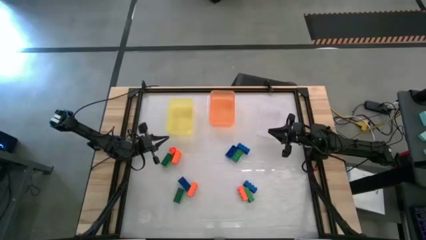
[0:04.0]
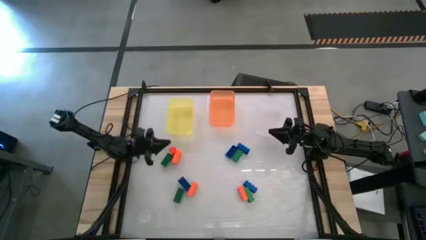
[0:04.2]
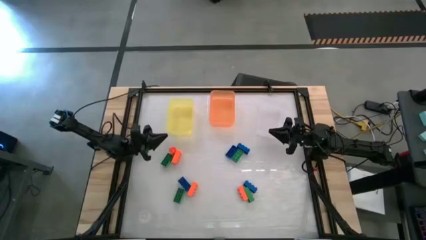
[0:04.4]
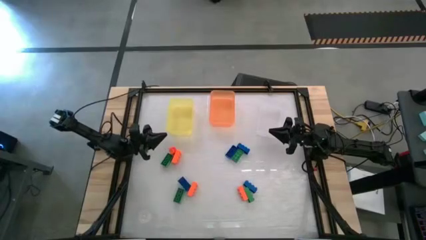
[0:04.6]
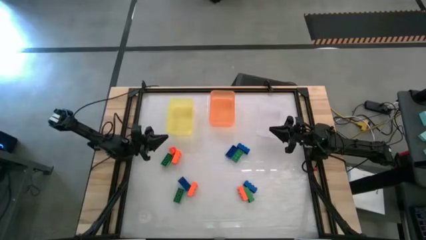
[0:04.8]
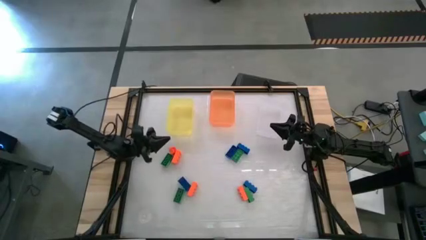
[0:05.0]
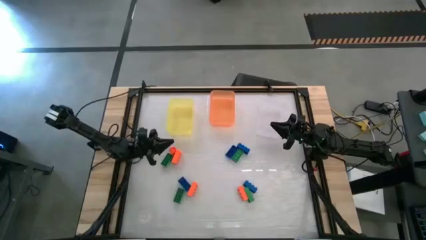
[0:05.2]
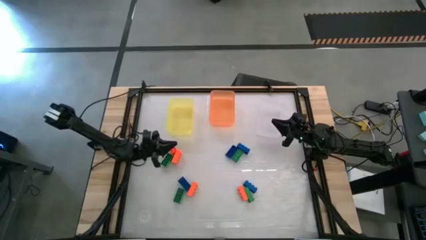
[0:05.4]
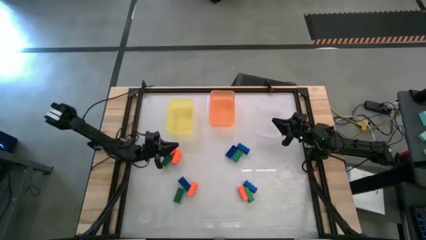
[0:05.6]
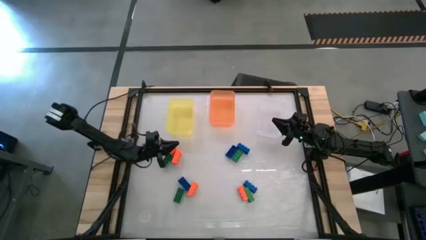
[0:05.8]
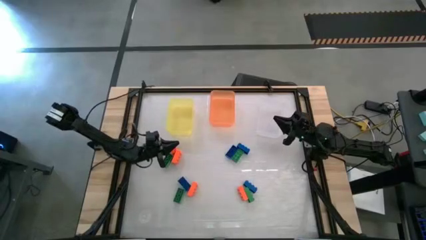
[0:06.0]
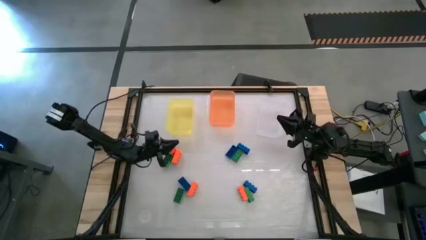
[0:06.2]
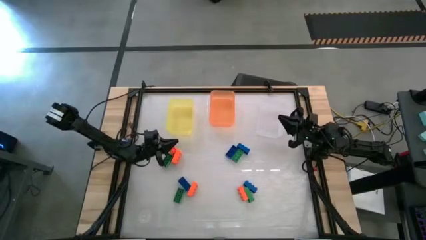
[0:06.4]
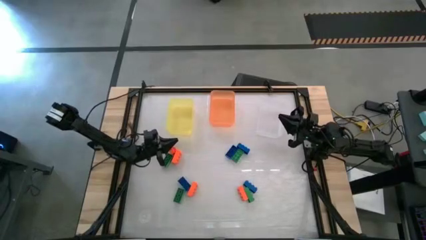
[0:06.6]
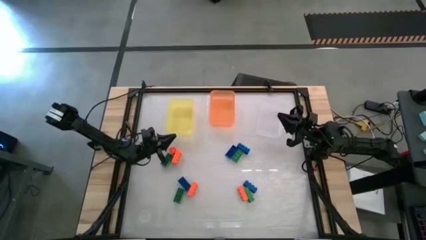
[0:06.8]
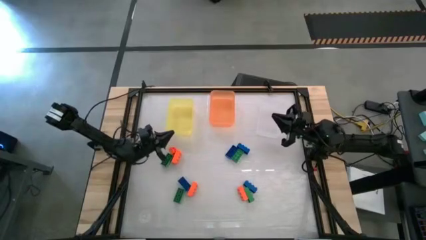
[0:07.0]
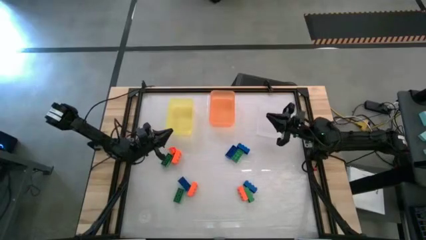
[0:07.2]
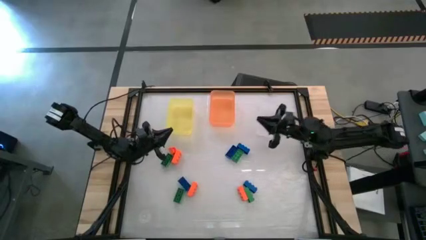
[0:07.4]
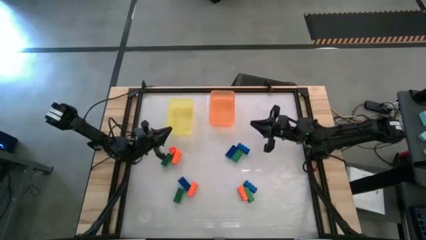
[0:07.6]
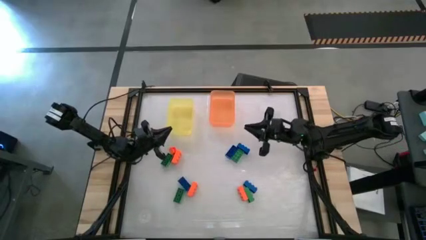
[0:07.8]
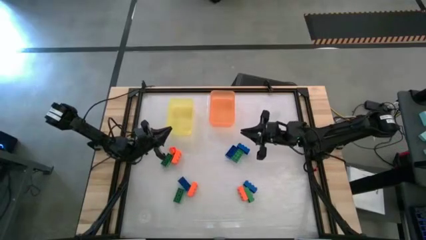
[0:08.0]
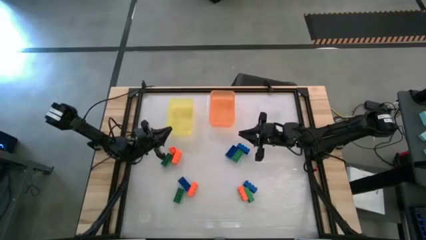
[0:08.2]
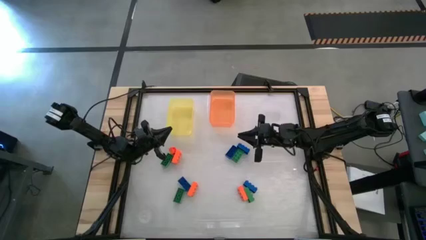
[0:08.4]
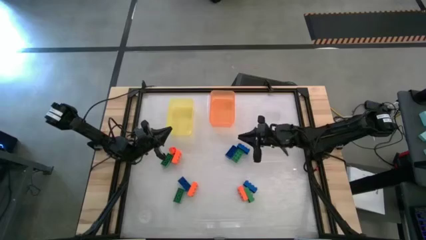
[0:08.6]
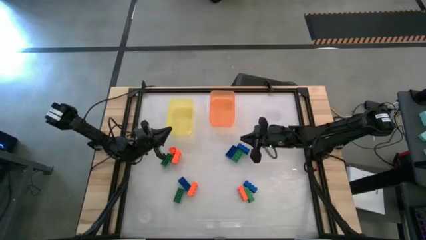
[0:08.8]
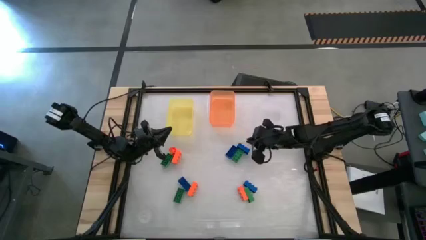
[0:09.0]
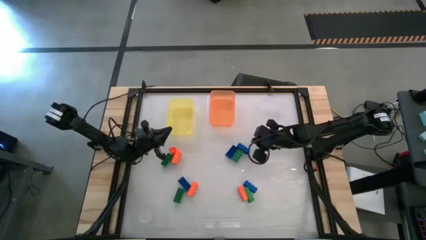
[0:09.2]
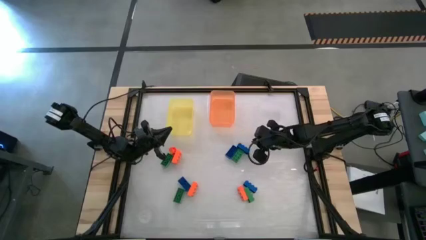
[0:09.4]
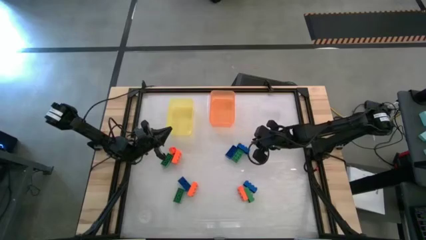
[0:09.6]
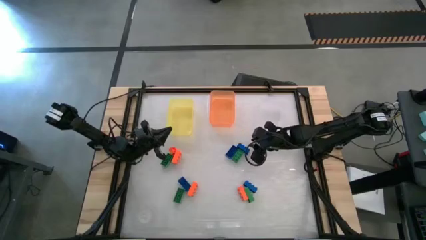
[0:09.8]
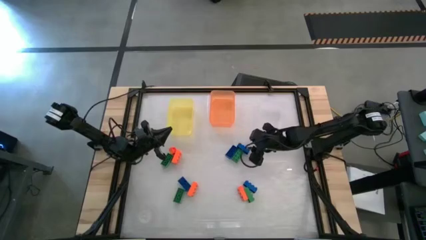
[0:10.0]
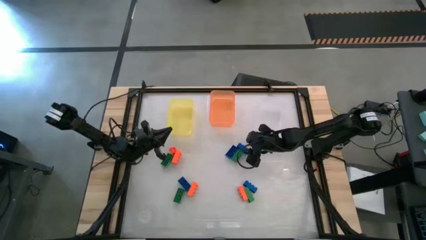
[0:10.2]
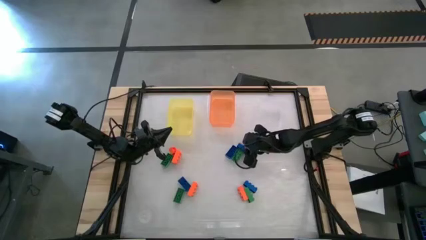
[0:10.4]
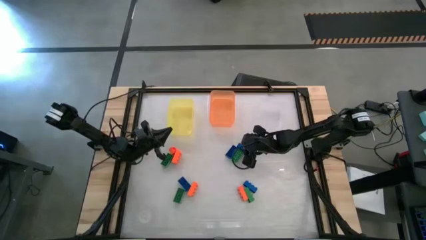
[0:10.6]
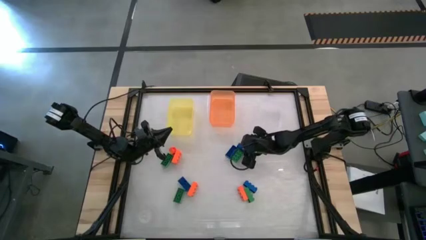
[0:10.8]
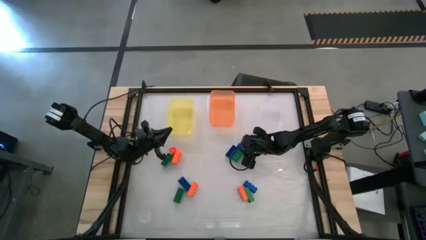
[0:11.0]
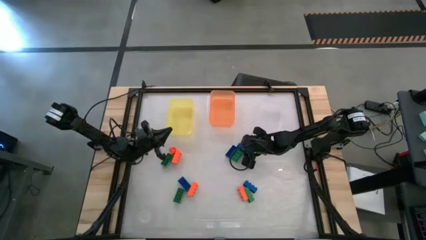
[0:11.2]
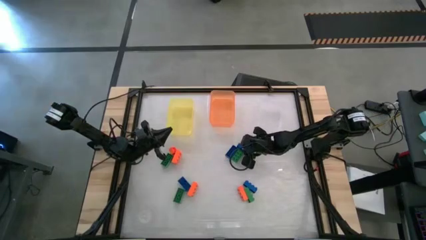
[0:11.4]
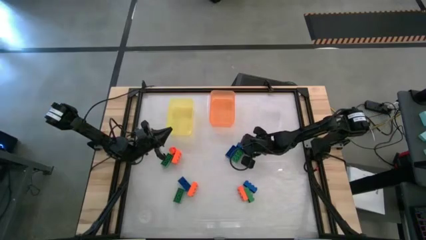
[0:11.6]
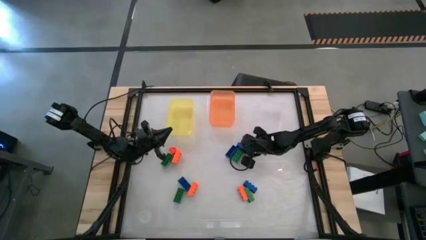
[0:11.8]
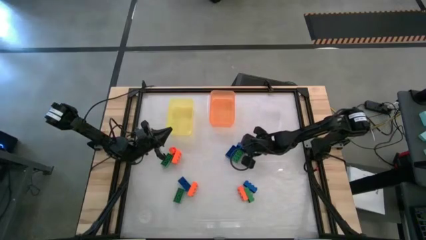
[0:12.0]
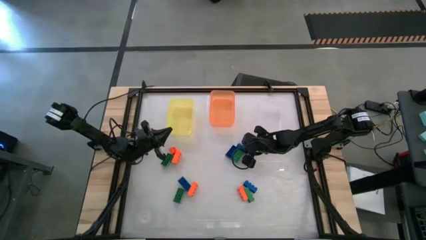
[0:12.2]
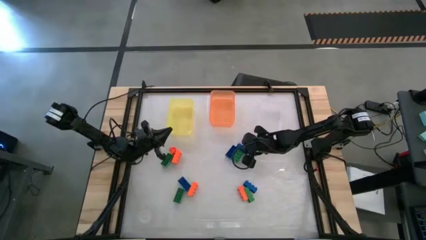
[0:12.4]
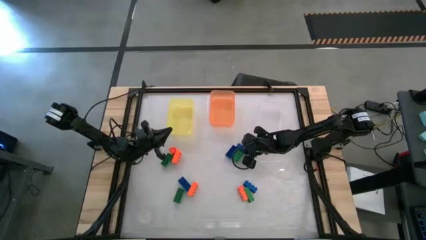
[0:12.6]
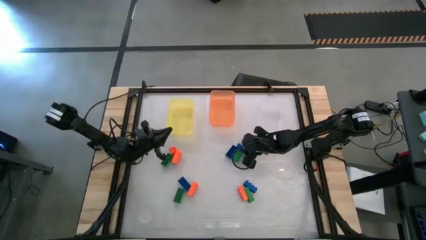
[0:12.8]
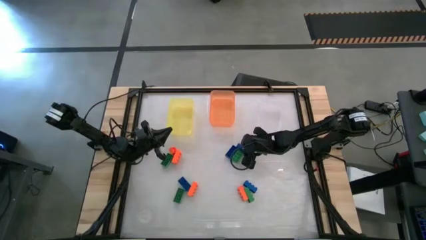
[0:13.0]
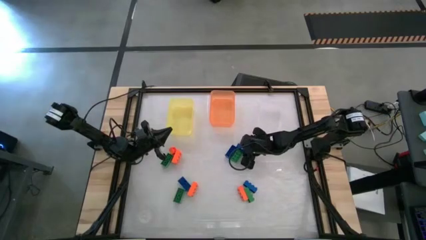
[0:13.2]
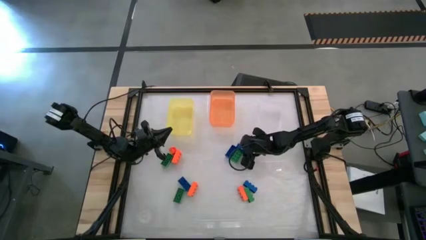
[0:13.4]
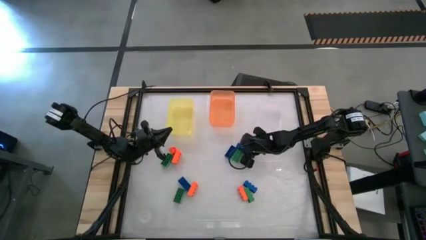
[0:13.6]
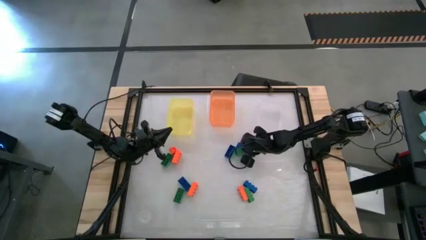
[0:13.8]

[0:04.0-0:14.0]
Task: Sort & place blocks by color
Put the blue game piece into the orange bin

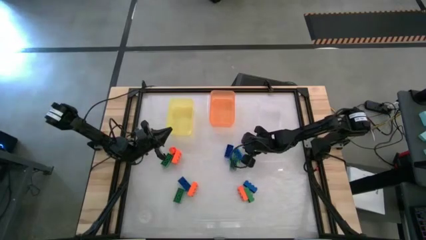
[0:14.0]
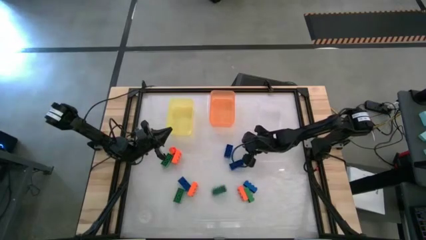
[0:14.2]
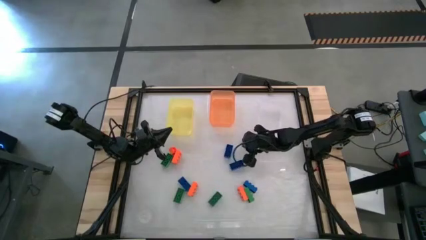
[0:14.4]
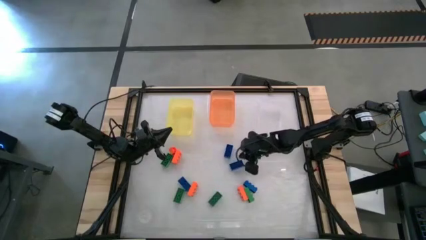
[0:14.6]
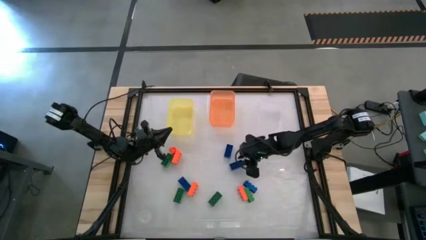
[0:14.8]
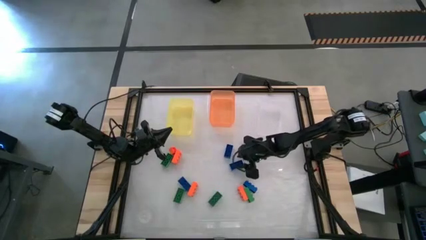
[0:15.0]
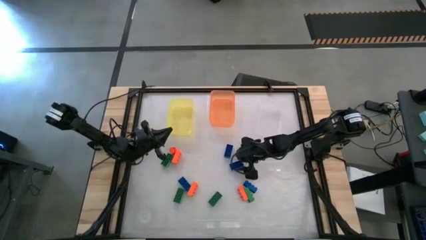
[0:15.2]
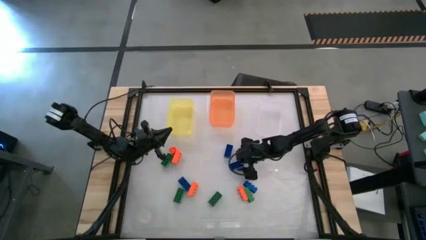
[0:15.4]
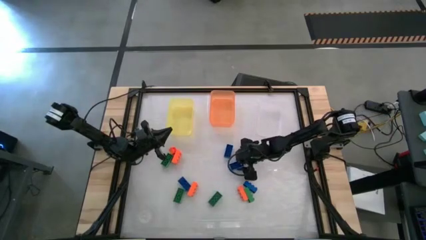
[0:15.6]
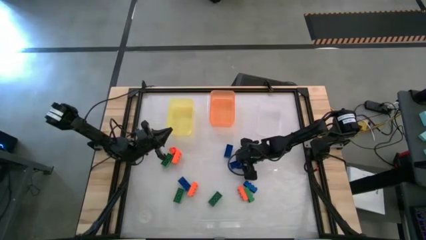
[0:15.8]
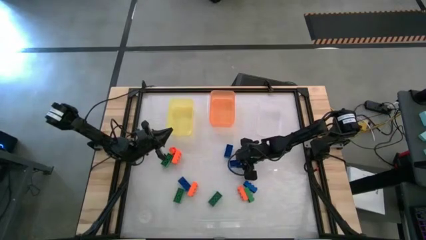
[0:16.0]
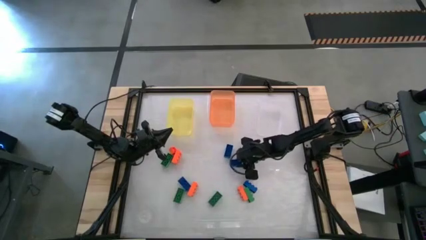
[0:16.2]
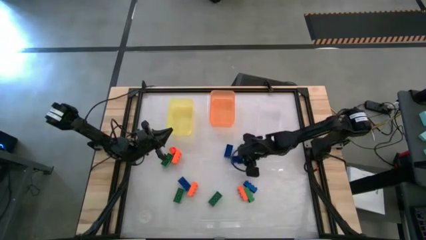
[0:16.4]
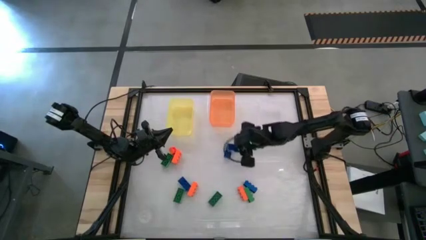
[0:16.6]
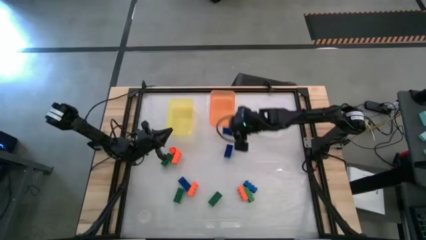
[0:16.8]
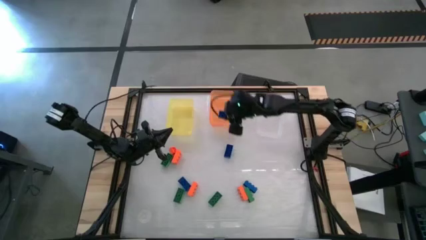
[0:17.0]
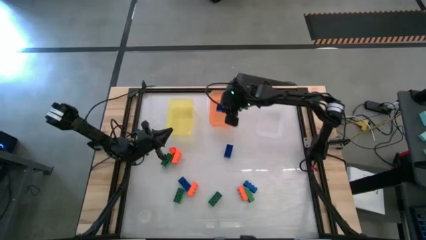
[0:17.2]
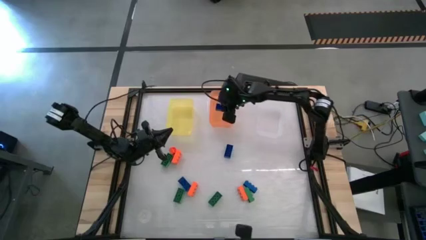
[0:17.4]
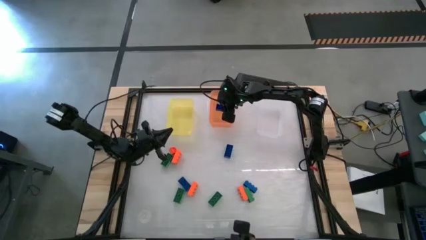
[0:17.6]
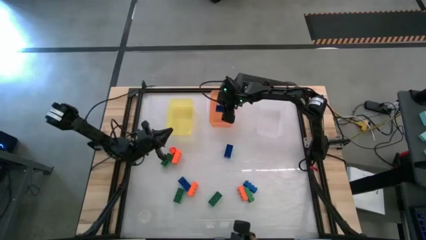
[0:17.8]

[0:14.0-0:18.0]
Put the blue game piece into the orange bin
